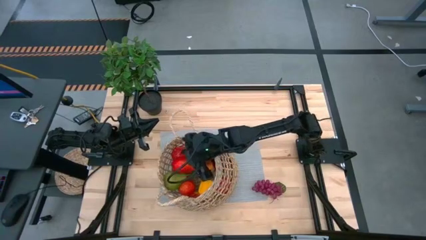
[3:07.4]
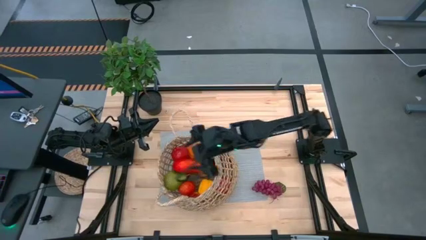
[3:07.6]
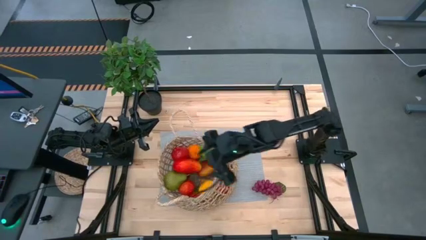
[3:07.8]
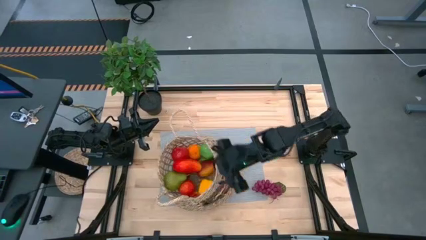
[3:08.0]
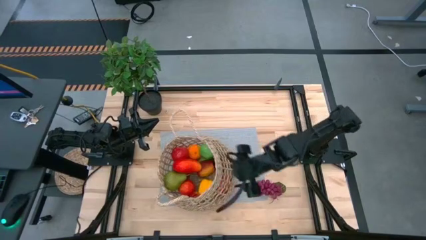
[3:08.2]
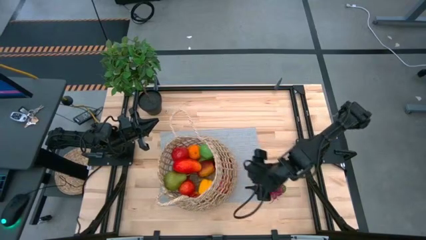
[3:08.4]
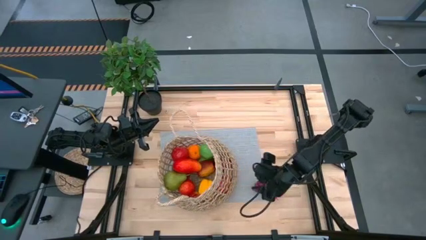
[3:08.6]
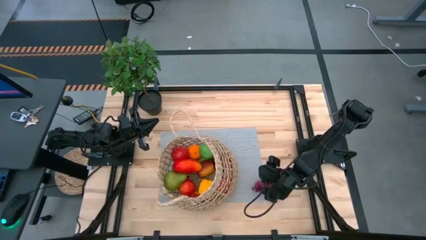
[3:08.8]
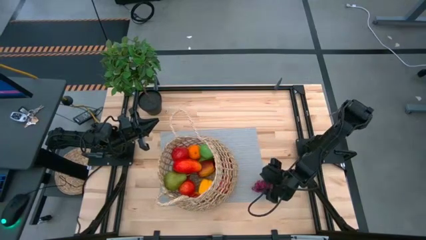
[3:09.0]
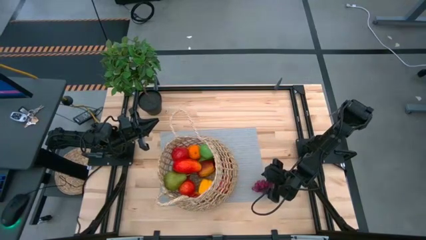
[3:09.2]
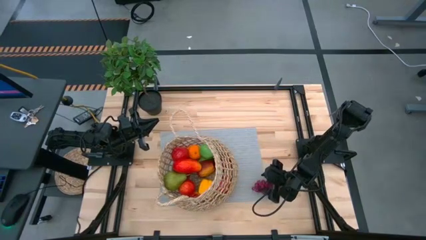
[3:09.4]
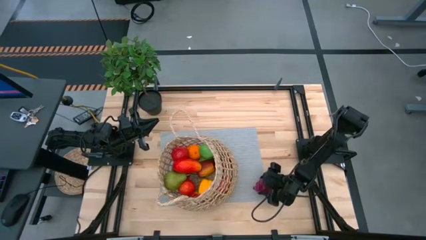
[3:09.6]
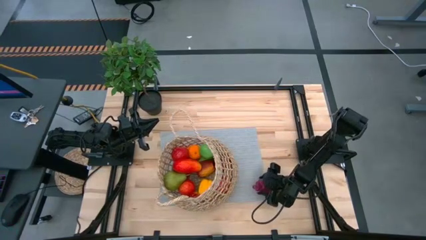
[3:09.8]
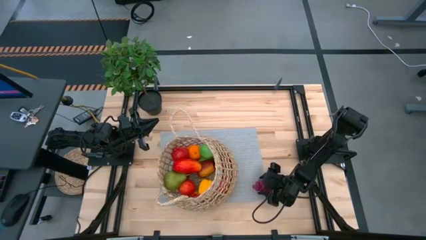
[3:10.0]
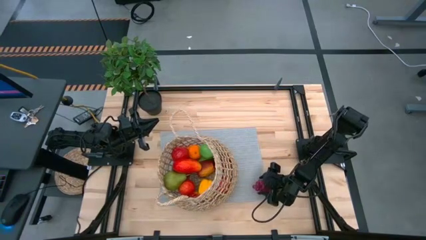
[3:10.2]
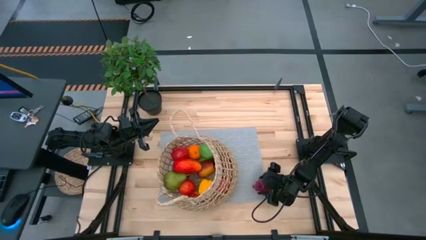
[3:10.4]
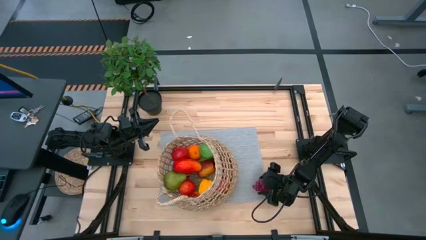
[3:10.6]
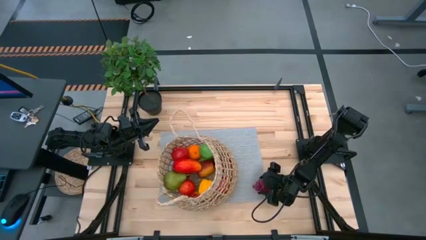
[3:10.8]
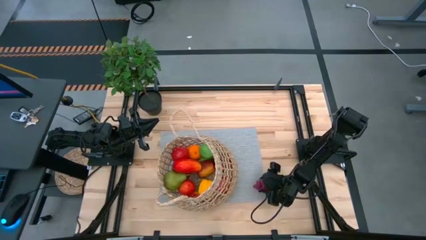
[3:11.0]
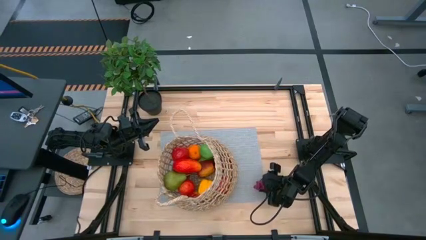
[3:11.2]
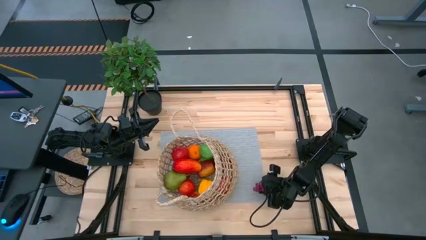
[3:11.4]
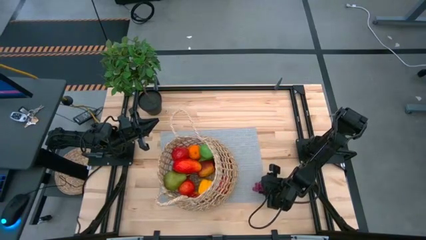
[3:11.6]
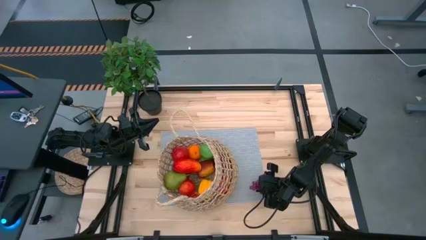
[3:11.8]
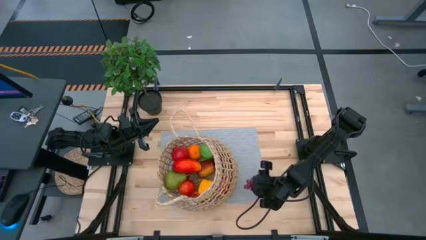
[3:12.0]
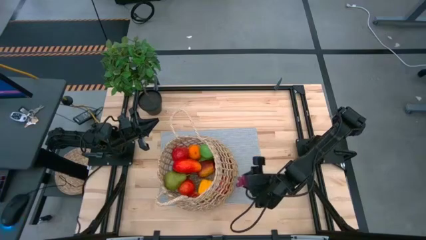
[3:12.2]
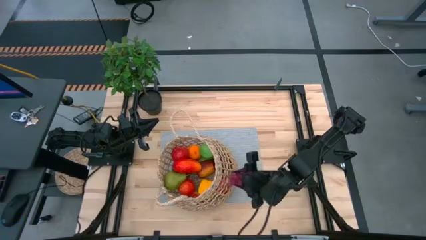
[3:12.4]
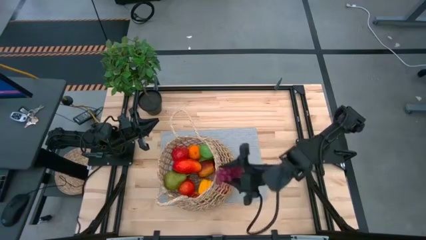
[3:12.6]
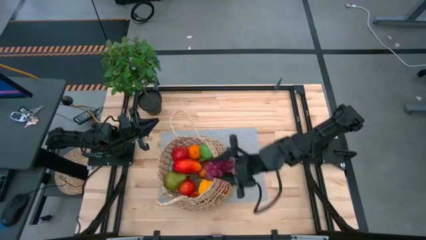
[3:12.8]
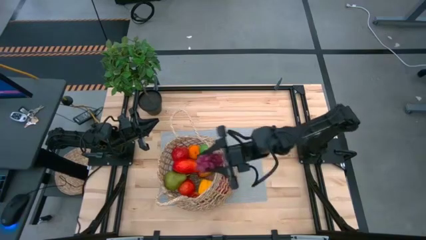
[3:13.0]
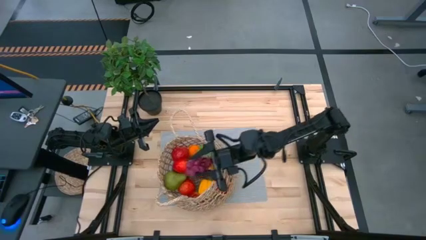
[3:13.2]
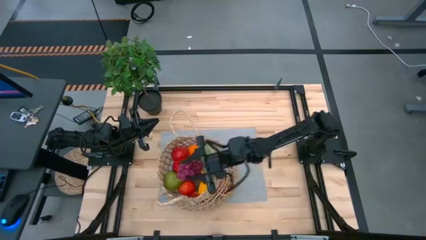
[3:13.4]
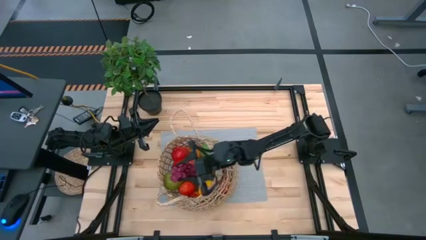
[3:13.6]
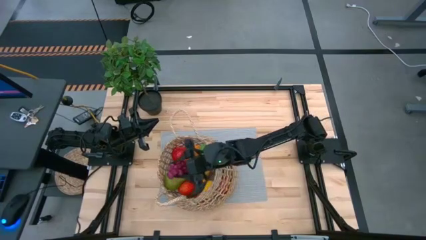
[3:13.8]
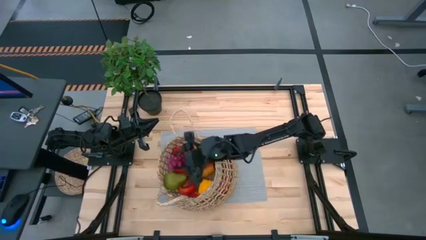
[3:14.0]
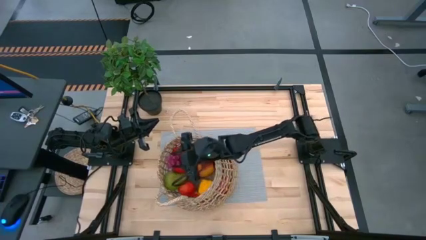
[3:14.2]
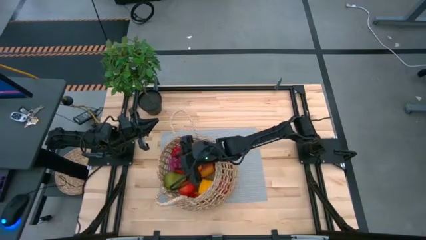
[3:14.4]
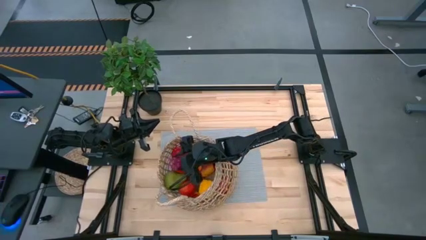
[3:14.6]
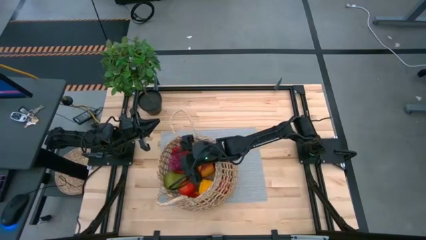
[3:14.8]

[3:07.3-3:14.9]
Task: Build produce basket
Put the purple grapes into the brown woven basket

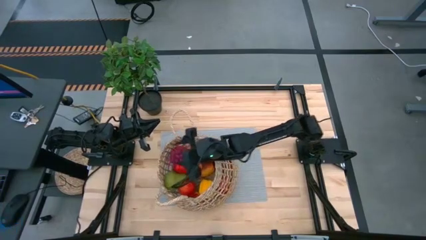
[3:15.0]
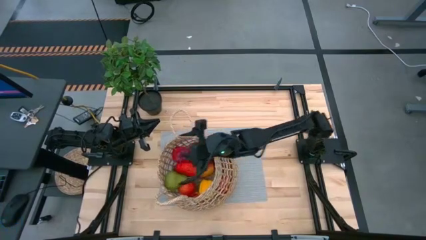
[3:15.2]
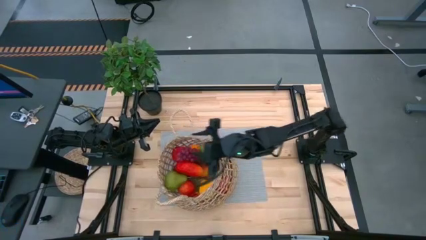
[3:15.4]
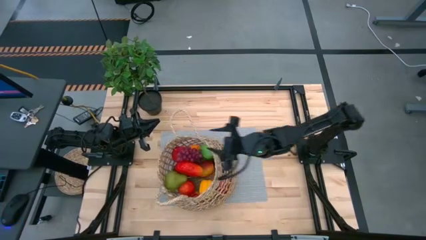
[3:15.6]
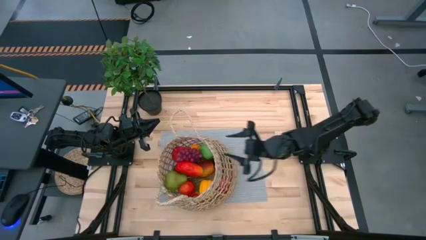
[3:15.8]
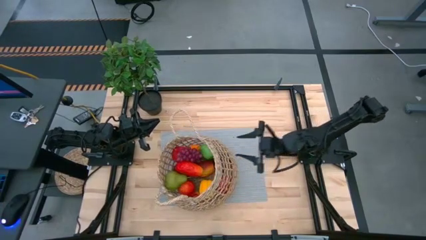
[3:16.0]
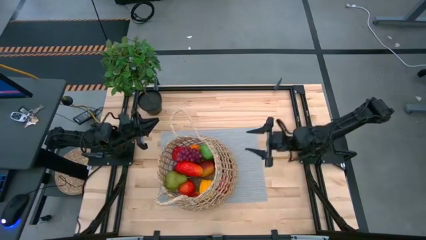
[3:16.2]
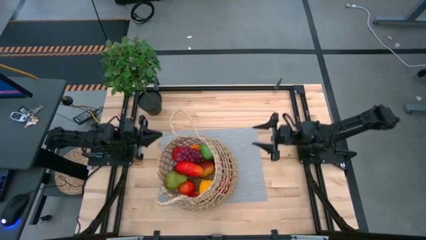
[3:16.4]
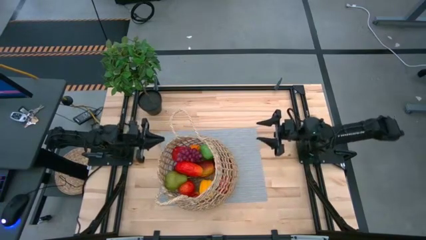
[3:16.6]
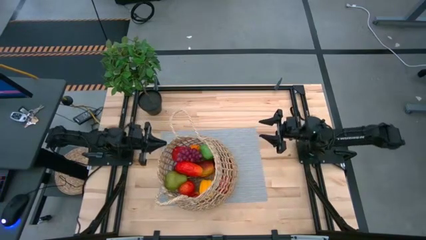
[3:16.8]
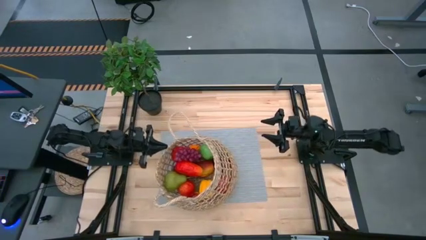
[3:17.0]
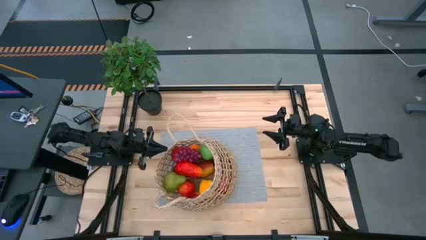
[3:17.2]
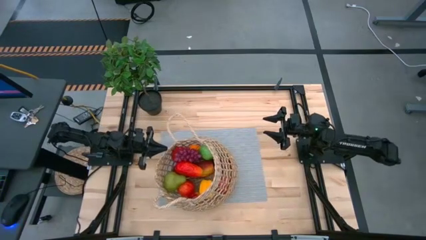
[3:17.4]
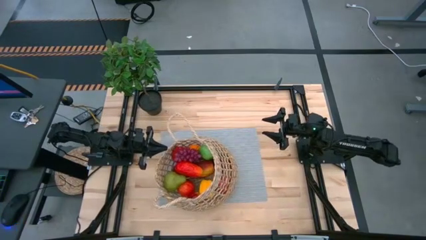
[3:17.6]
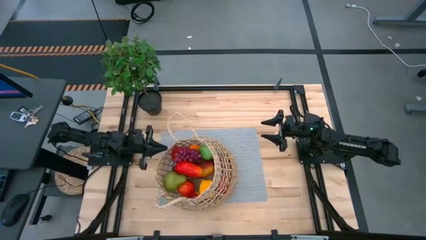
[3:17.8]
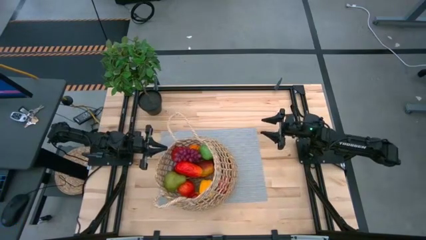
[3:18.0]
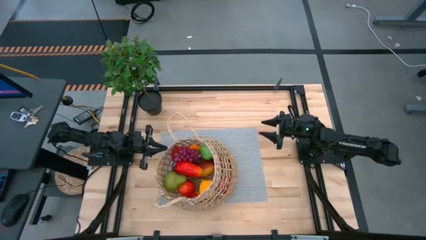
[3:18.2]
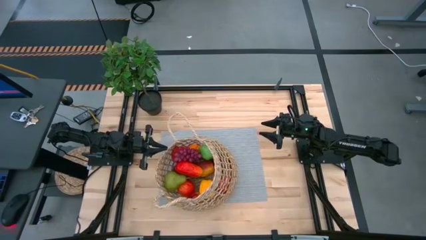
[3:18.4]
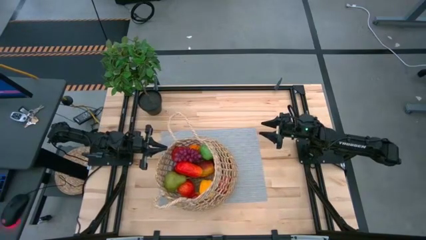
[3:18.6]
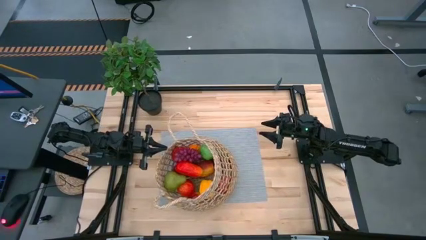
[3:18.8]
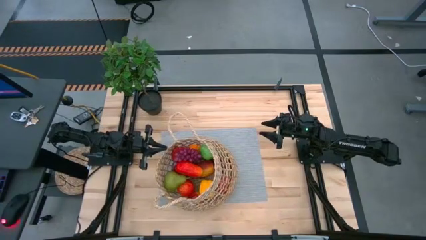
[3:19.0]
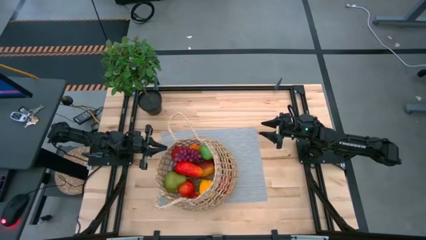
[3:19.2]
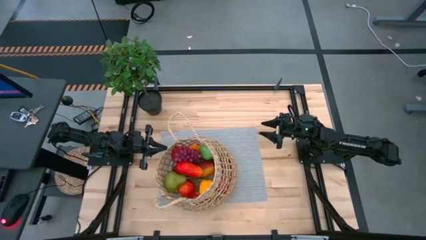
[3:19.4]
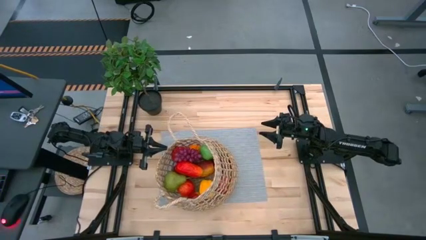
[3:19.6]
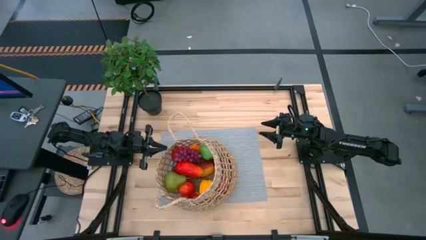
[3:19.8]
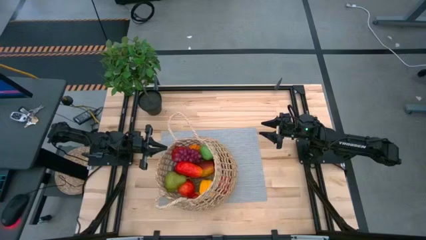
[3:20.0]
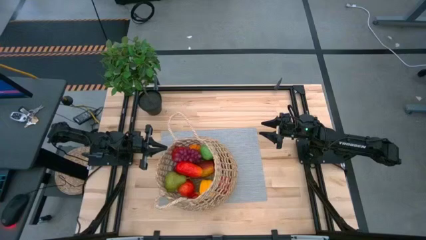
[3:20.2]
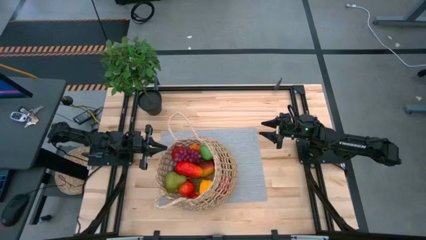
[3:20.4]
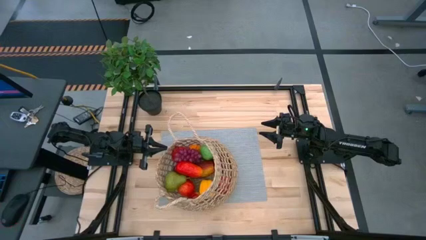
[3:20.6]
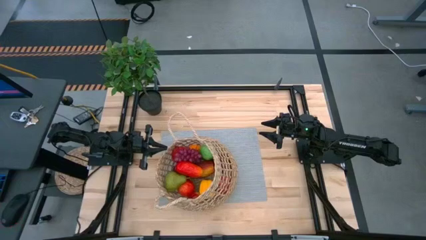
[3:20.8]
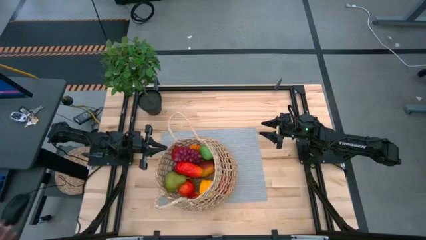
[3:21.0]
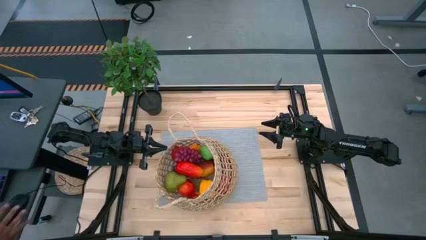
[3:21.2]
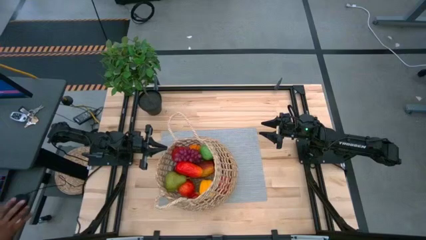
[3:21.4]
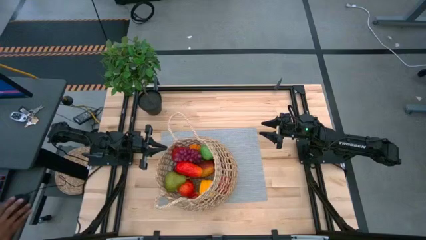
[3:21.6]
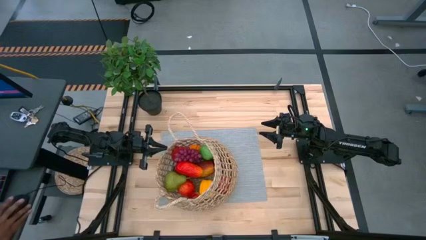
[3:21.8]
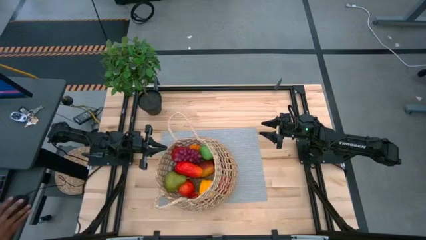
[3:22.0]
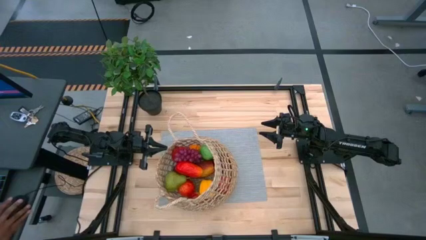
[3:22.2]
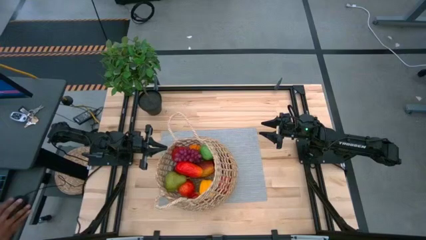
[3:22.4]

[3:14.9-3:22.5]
Return to Home Position
